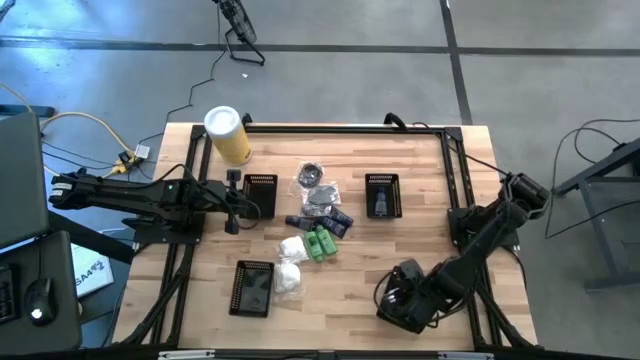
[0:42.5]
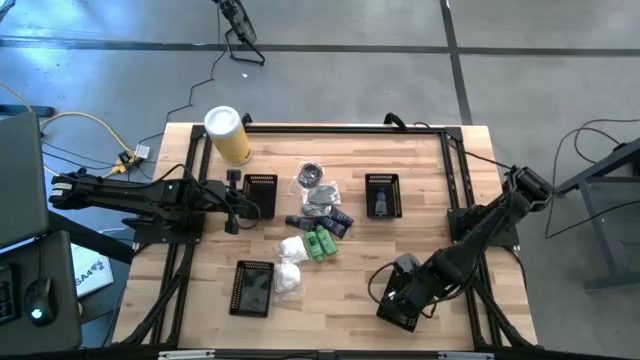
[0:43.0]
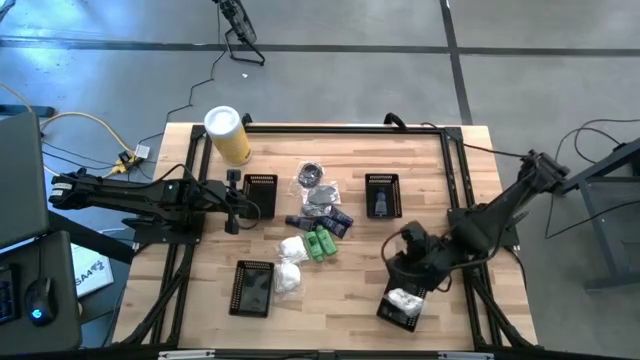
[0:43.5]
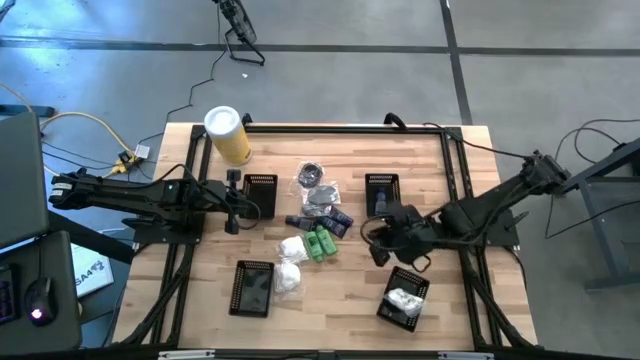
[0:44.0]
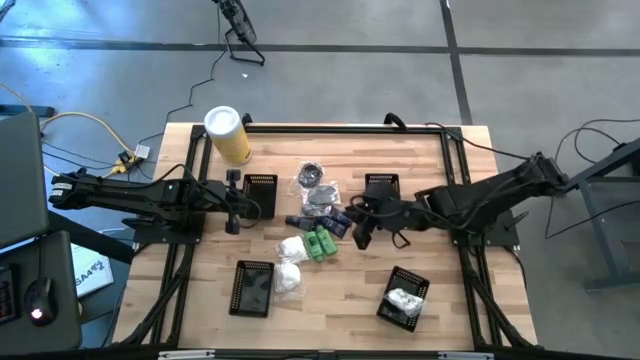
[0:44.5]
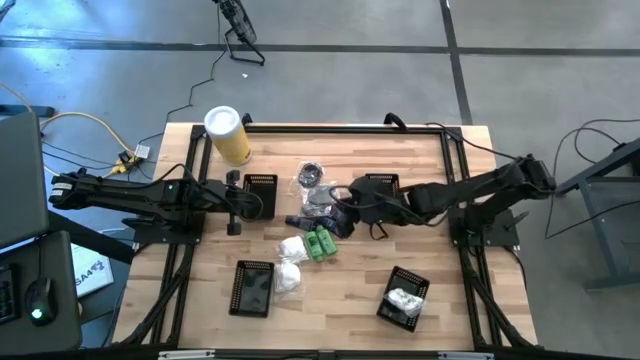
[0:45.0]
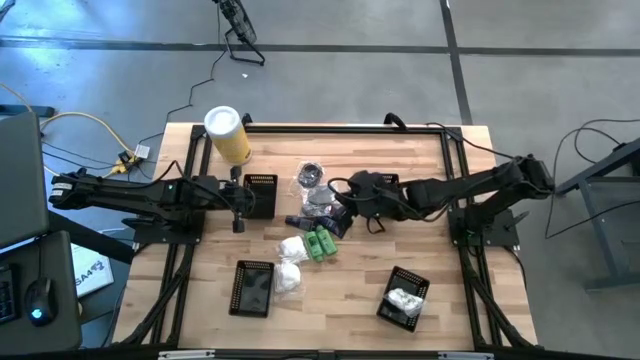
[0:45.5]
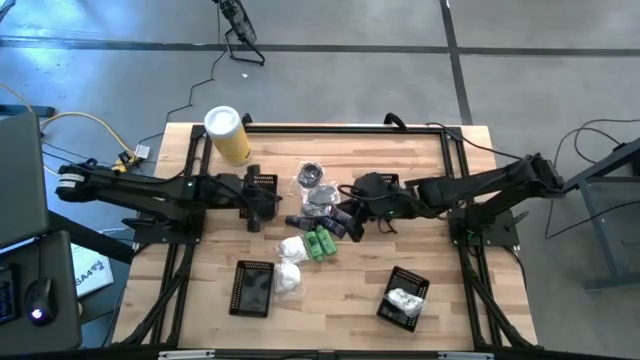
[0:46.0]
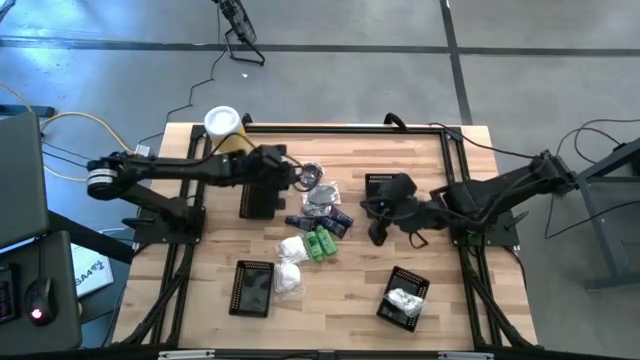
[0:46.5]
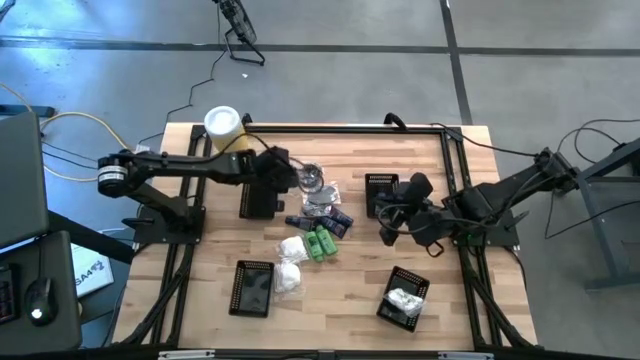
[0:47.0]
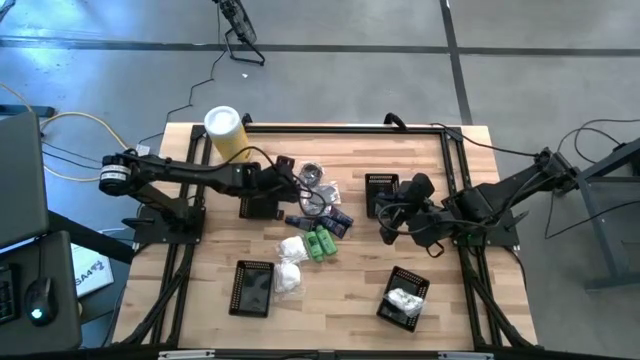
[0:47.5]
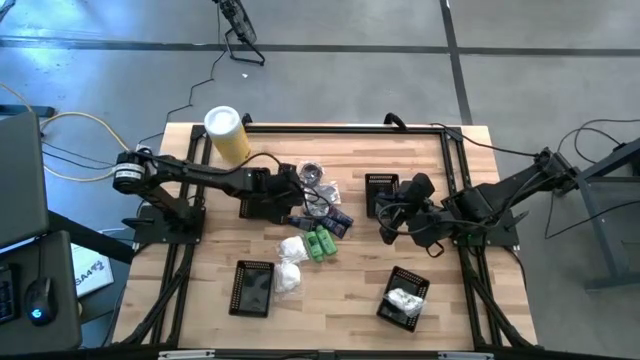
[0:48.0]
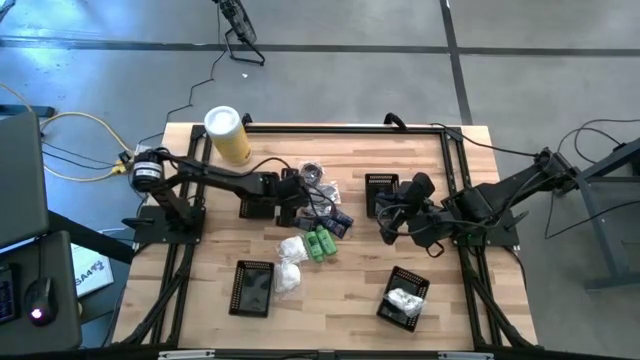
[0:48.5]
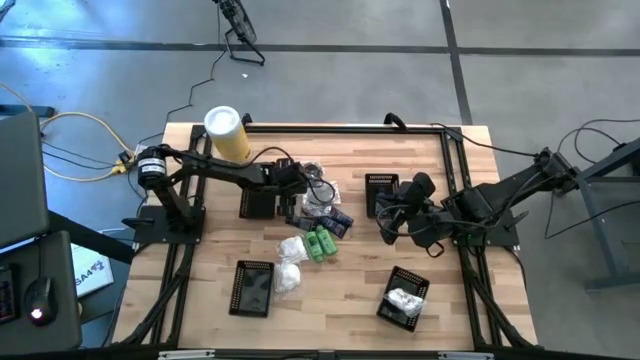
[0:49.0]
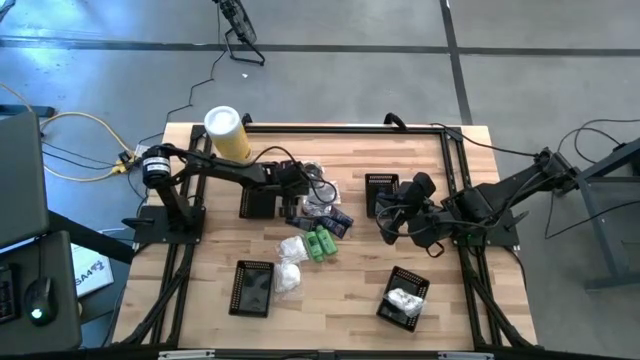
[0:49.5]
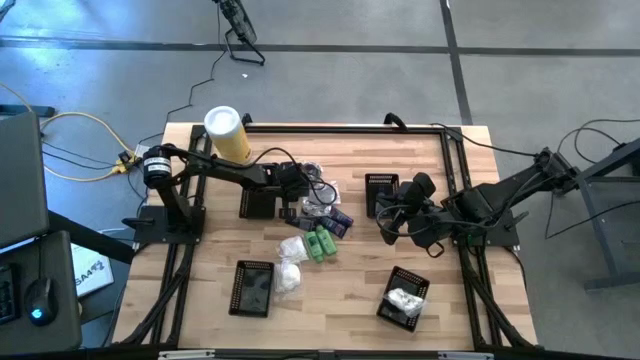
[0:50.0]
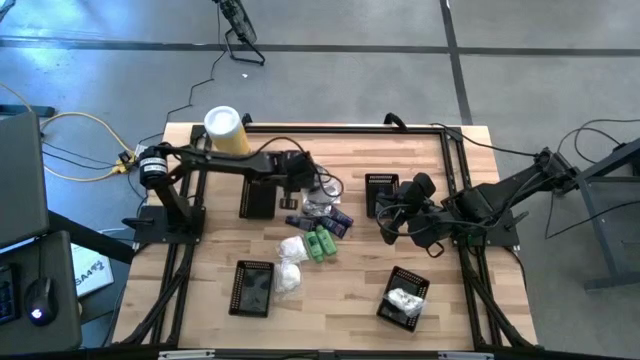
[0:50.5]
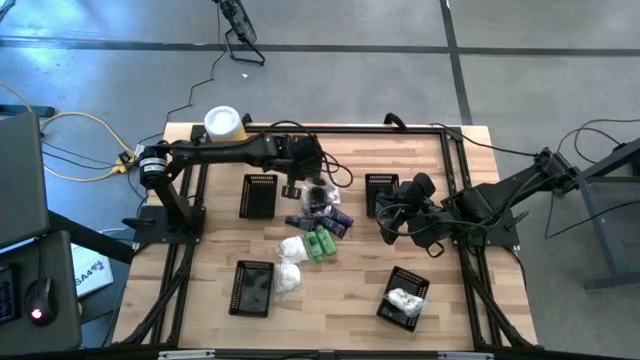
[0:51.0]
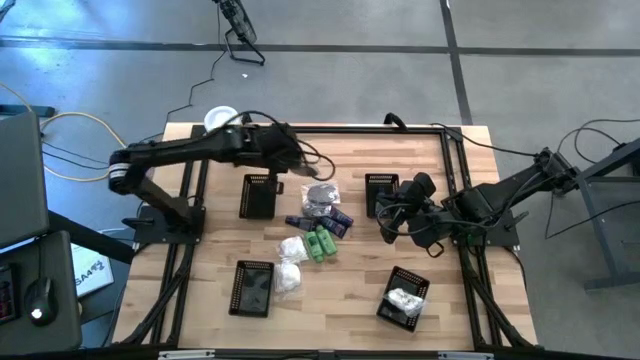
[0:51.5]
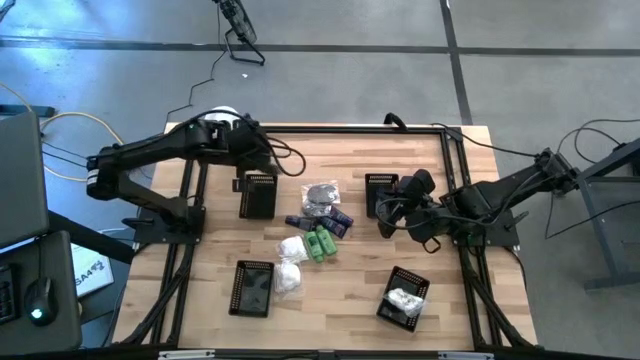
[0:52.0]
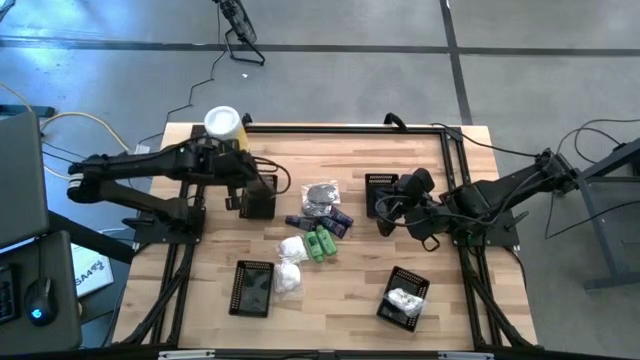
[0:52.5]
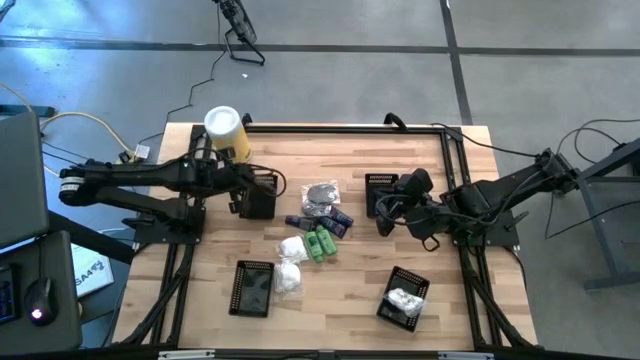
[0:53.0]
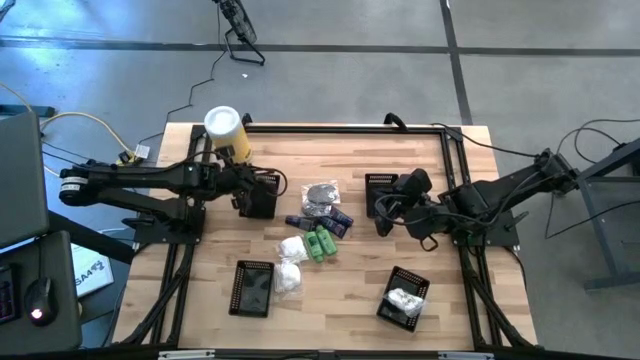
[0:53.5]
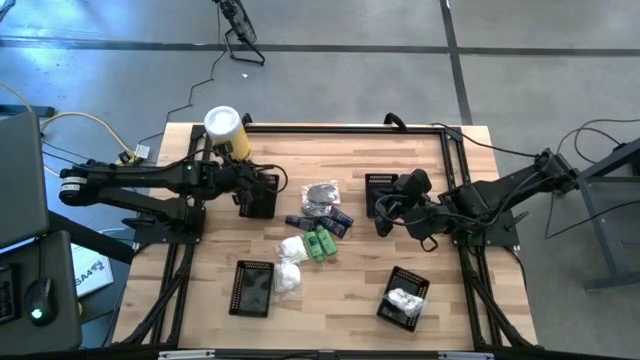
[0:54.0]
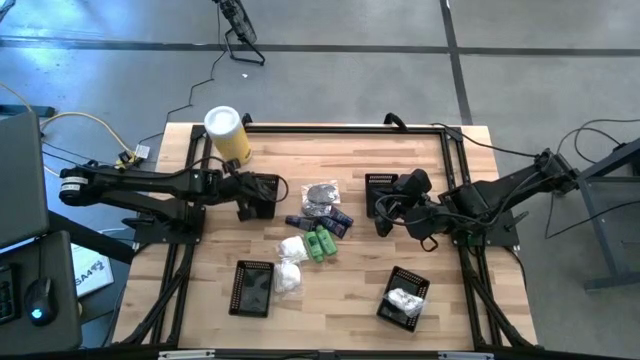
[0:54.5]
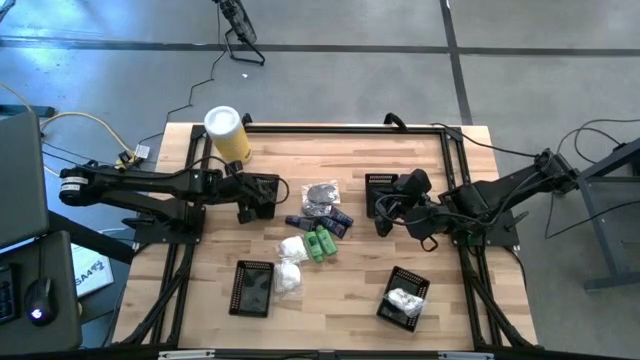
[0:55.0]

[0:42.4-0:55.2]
Task: Pick & Place Travel size toiletries
Put the black hairbrush into the top left black basket

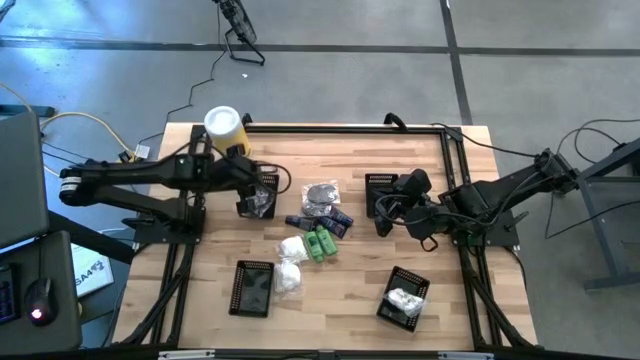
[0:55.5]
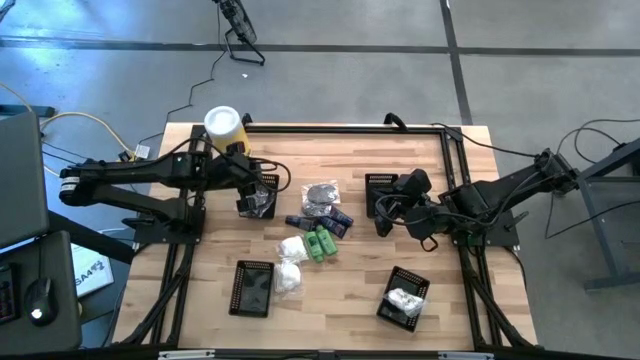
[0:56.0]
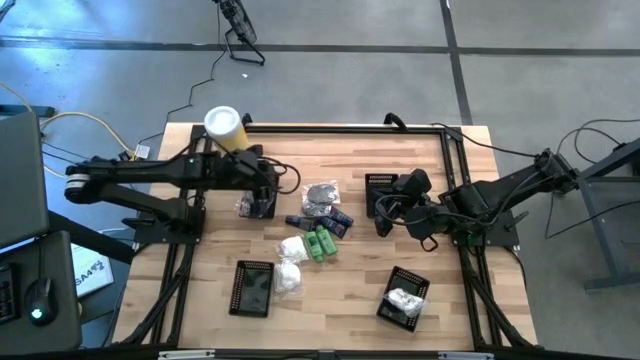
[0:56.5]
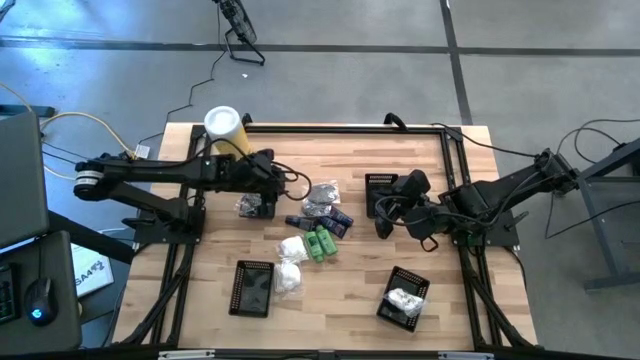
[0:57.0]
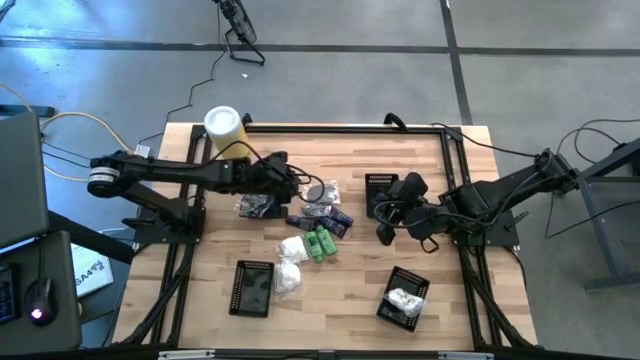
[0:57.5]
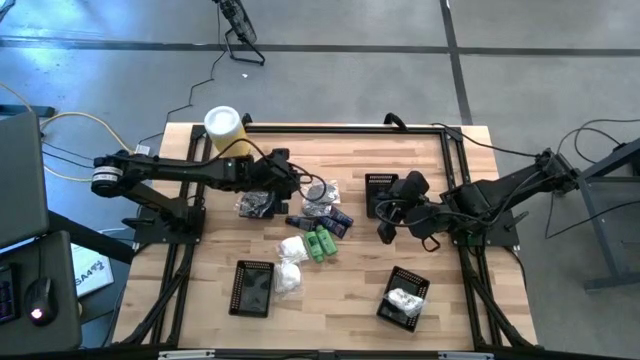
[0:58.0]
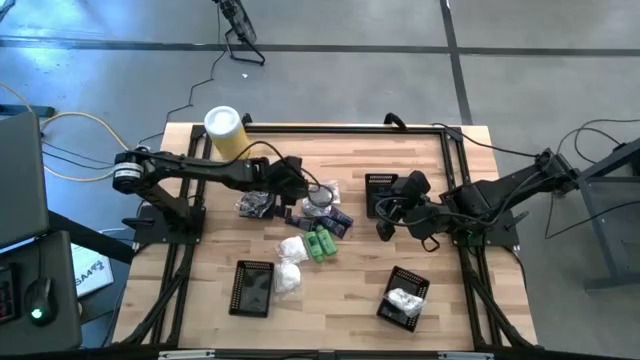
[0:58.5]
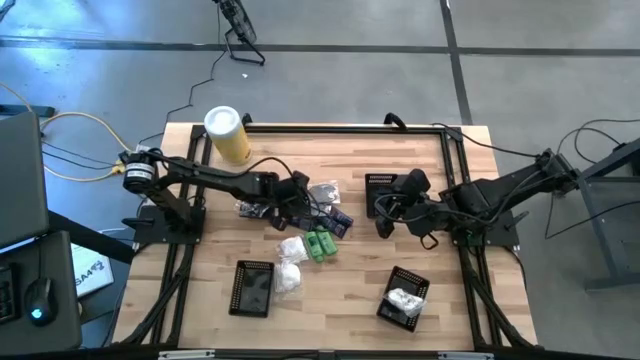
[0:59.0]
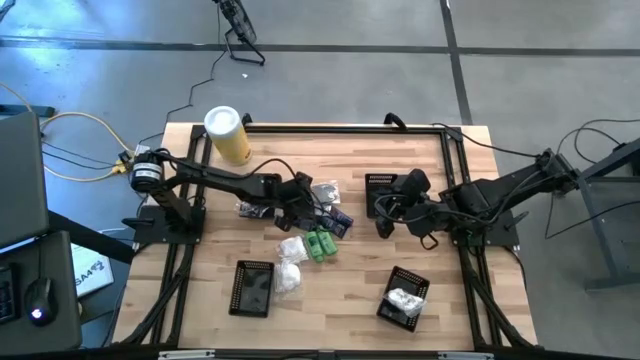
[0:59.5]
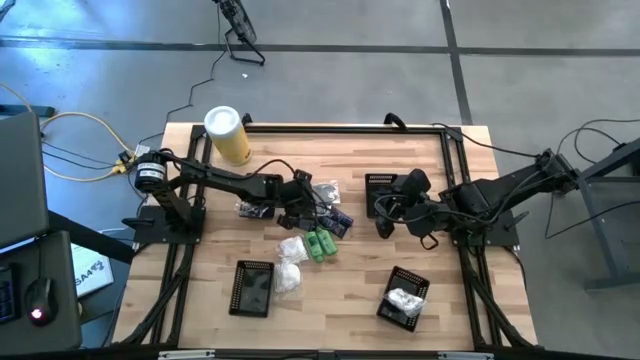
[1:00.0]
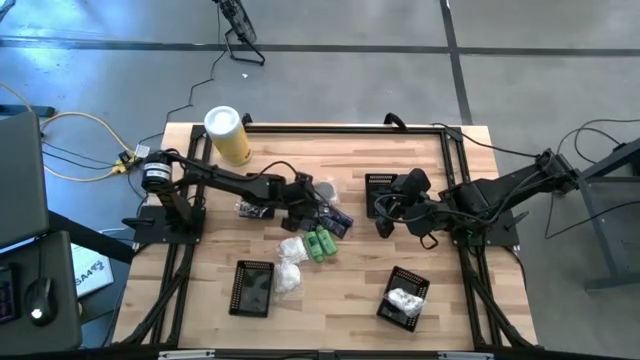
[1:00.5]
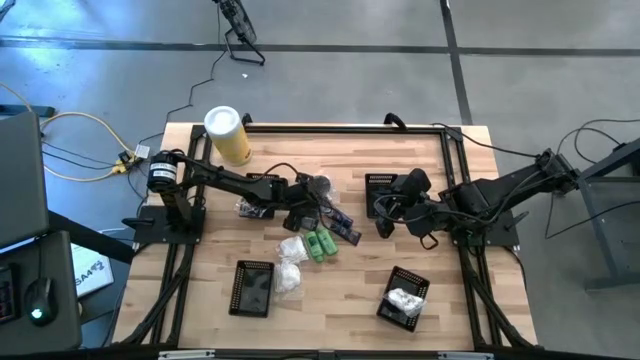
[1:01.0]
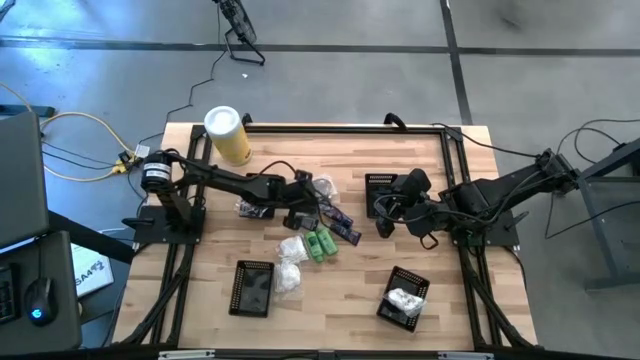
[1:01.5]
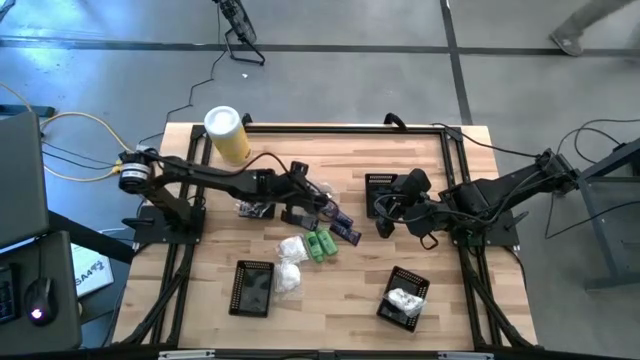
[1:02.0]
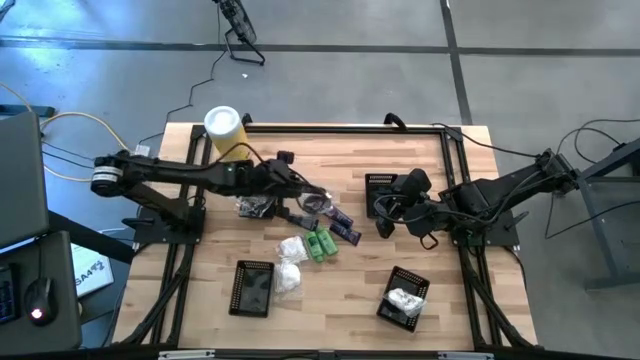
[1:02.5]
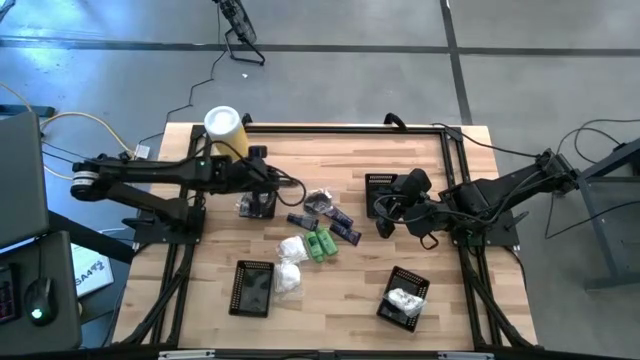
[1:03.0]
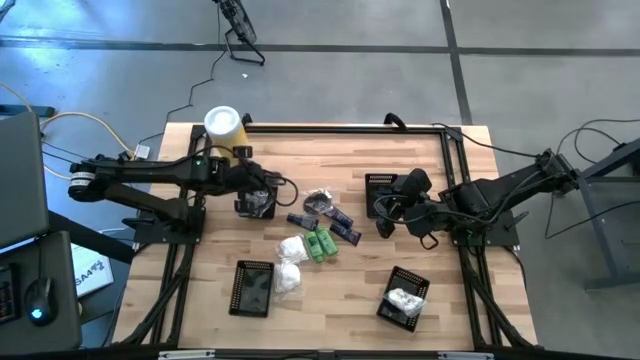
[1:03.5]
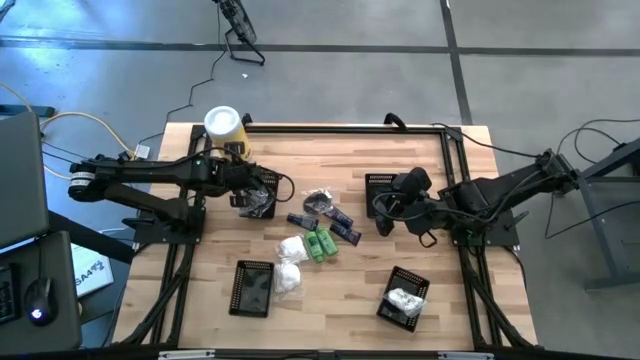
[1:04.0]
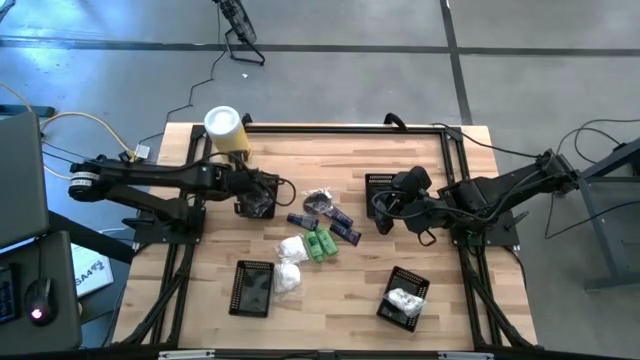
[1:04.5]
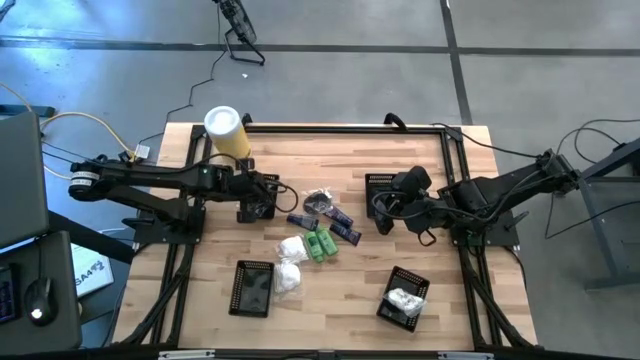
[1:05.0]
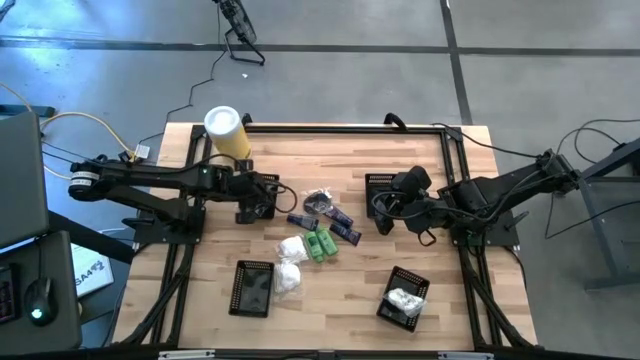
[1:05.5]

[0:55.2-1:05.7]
Put the black hairbrush into the top left black basket
